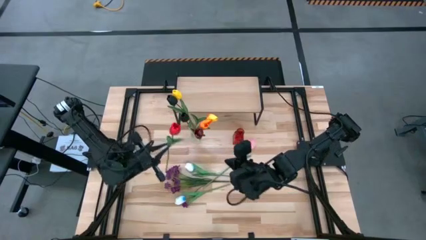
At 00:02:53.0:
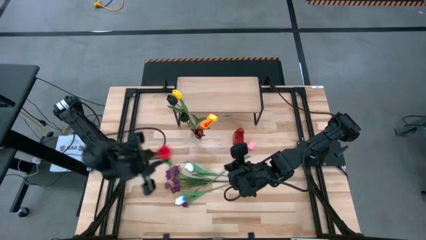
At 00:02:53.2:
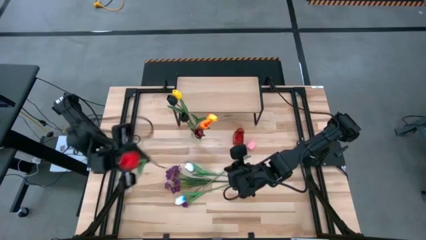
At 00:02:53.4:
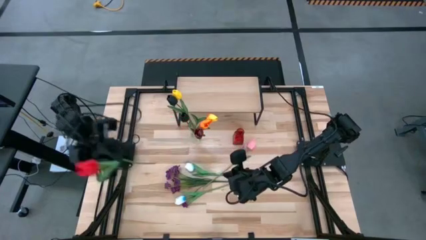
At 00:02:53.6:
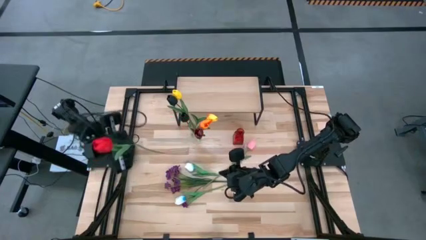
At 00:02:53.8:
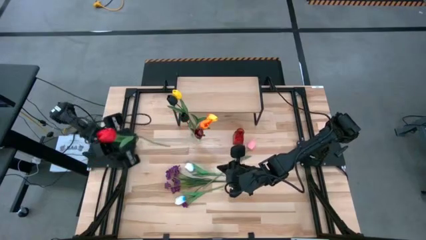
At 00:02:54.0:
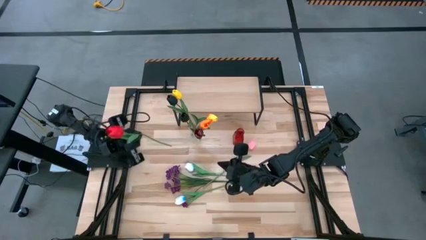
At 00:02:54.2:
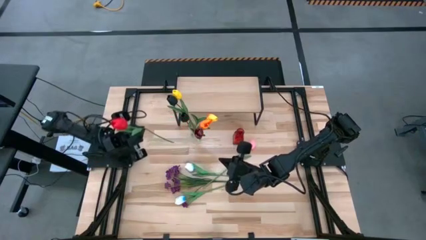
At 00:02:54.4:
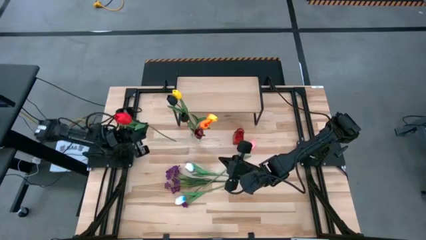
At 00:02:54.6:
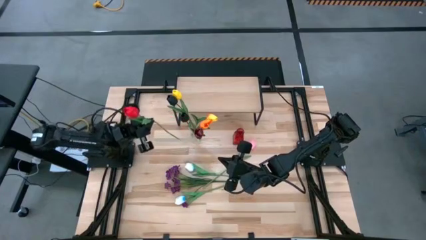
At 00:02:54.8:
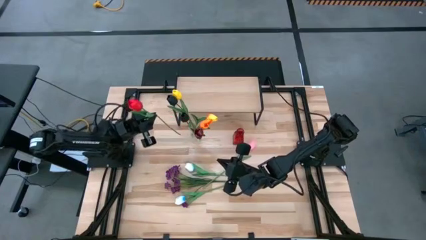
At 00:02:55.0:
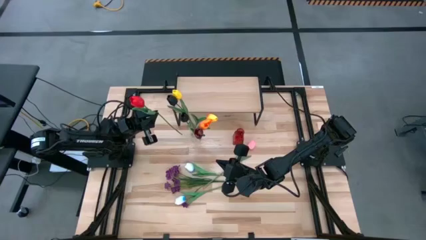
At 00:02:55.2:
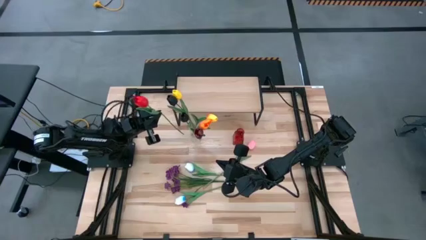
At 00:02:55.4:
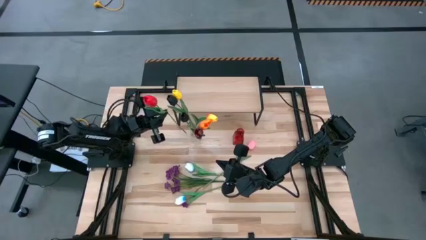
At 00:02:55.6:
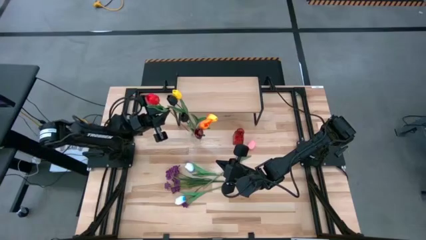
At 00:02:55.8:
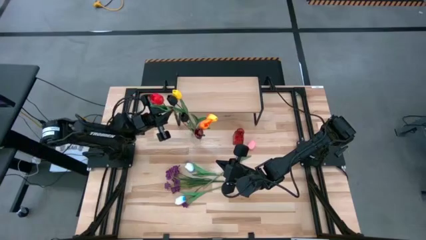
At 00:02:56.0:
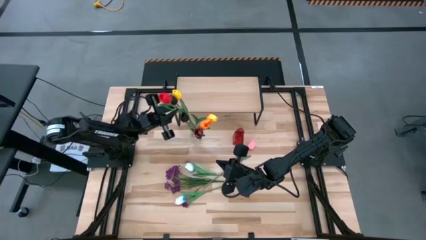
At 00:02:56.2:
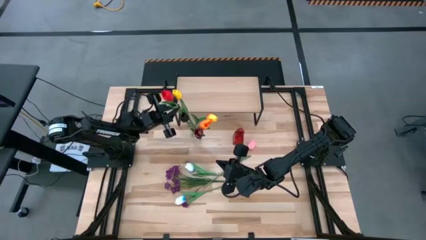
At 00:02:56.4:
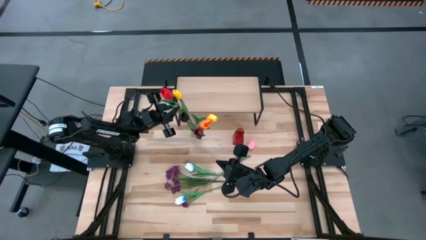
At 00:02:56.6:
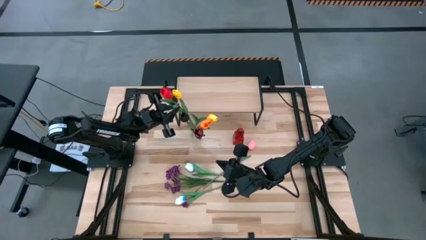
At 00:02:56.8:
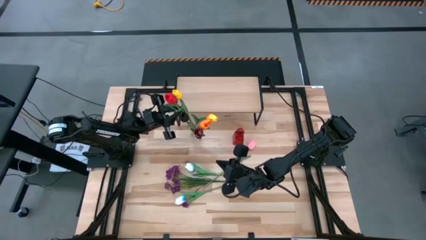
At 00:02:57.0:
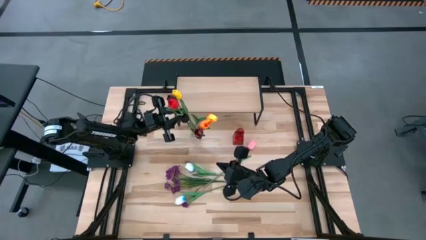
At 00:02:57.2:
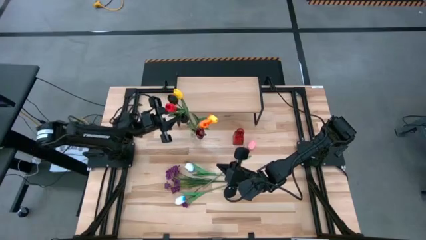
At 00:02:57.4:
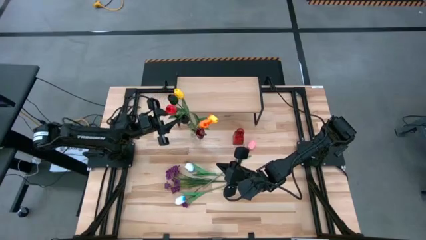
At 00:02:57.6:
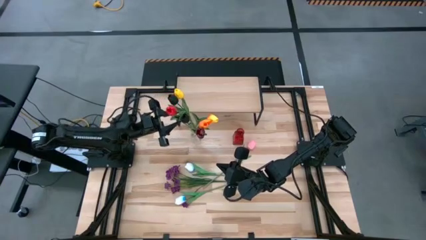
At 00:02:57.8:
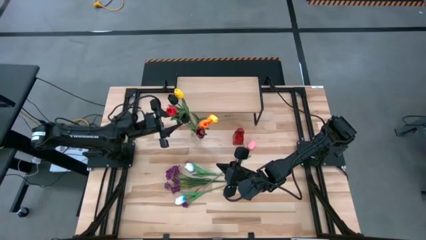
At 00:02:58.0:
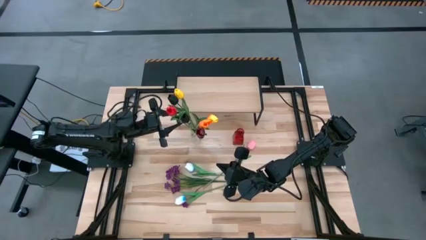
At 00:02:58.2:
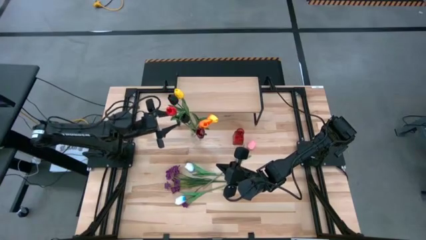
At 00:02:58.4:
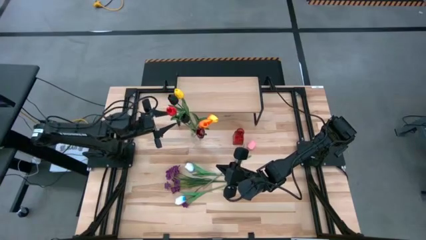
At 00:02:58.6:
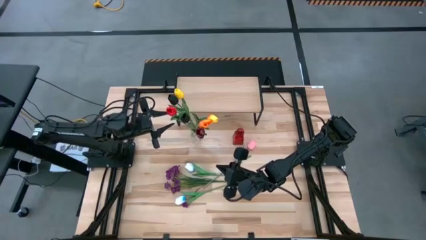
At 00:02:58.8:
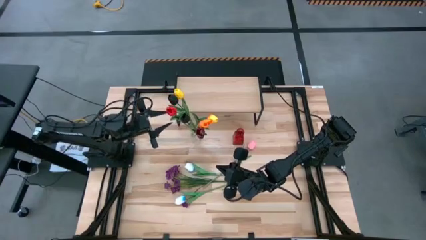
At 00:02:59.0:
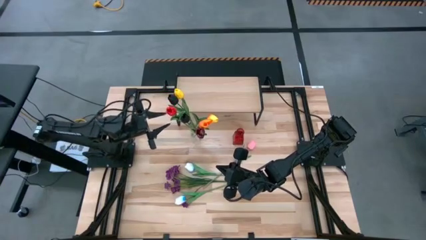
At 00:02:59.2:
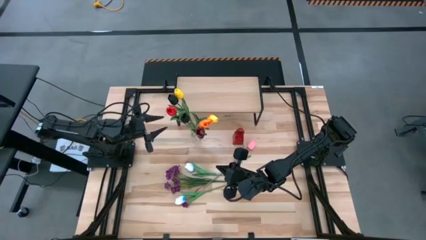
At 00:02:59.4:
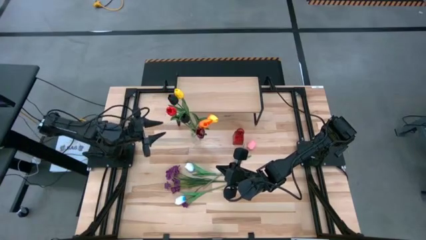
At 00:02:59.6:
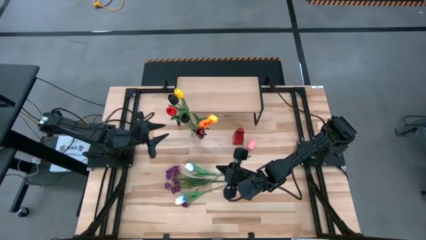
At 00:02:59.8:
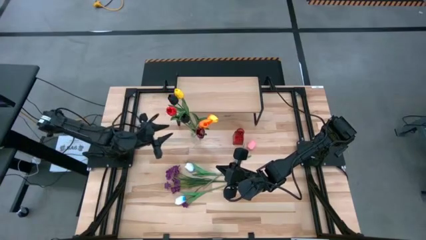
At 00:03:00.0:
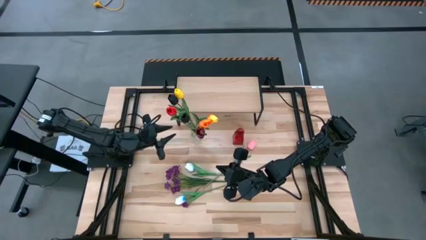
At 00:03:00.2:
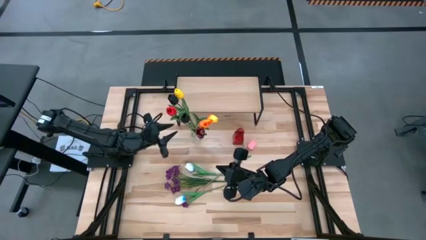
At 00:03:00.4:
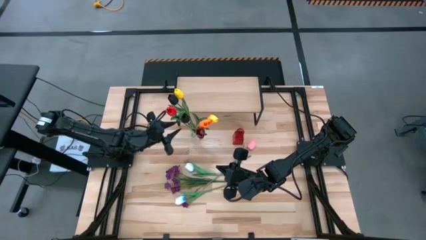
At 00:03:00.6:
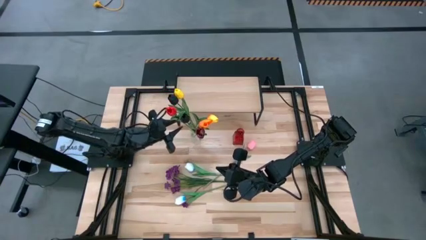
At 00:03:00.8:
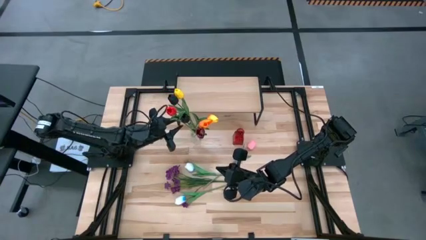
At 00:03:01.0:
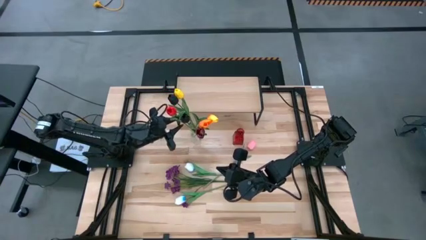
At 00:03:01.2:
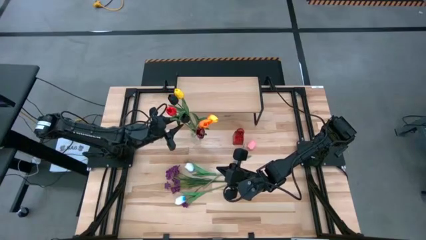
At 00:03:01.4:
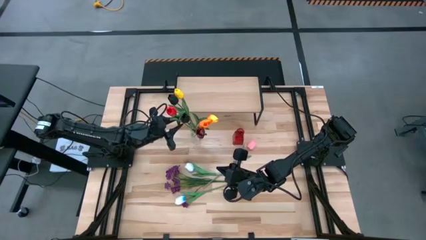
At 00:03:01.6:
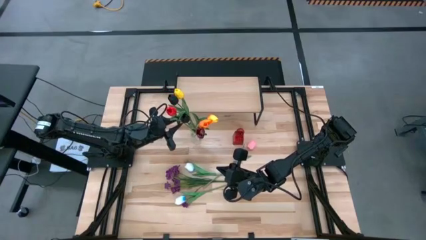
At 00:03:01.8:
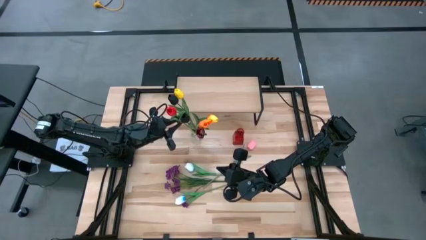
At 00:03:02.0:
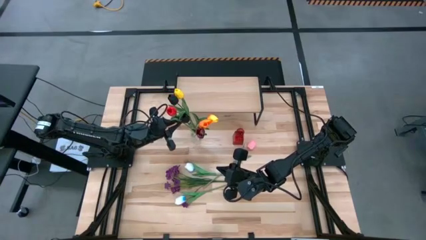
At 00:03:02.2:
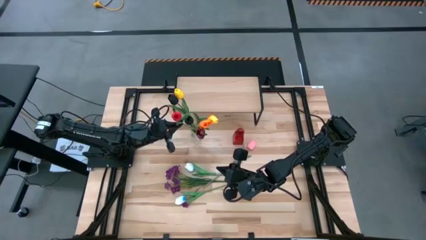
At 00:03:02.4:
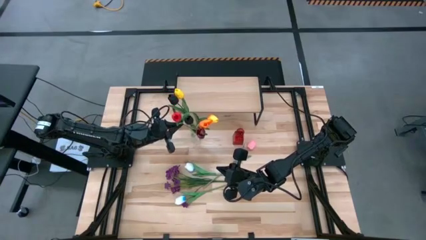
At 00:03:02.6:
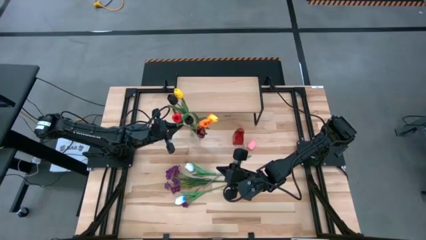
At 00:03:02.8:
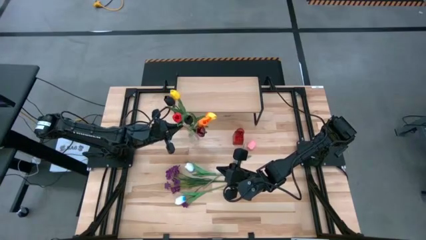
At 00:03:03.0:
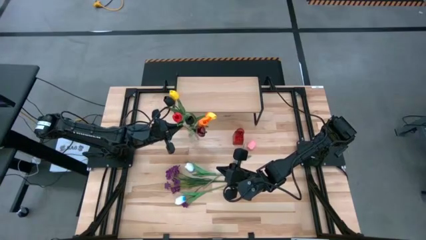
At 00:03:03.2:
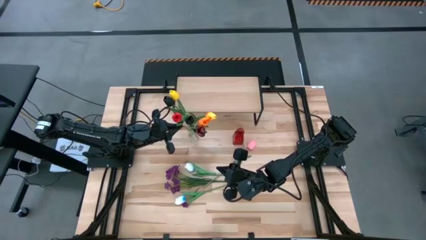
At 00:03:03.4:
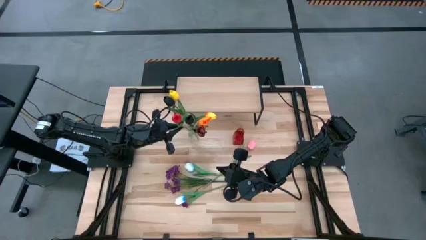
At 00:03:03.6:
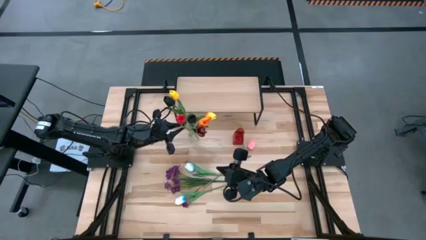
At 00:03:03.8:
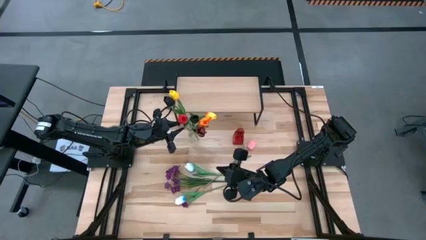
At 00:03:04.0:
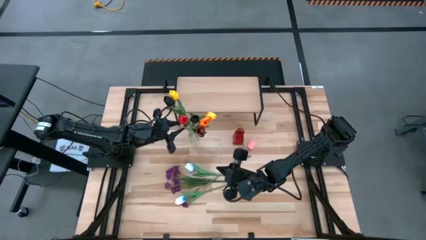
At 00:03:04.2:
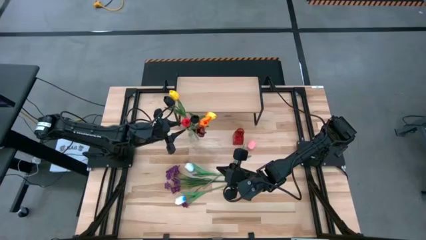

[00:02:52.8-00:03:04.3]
Task: Pick and place flowers into a vace then onto a shelf
Put the red tulip into the transparent vase

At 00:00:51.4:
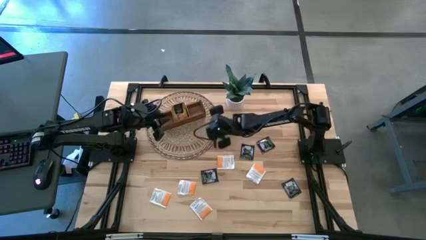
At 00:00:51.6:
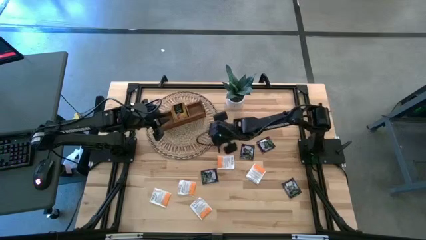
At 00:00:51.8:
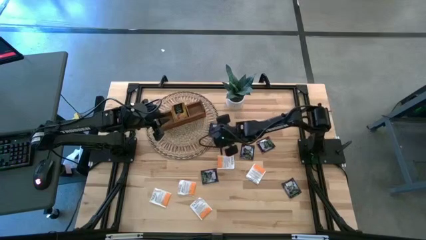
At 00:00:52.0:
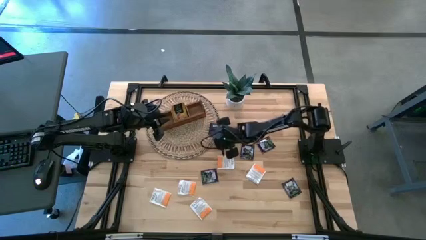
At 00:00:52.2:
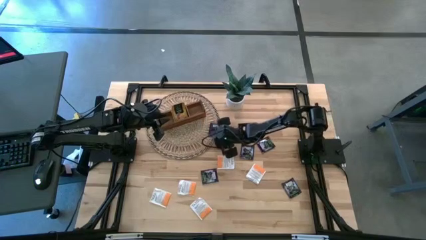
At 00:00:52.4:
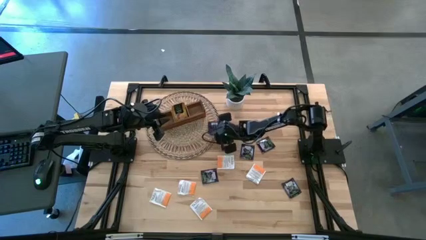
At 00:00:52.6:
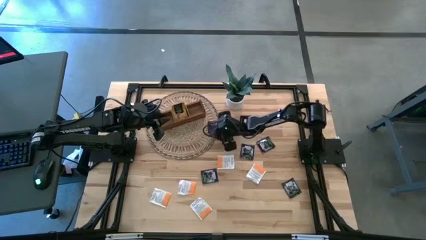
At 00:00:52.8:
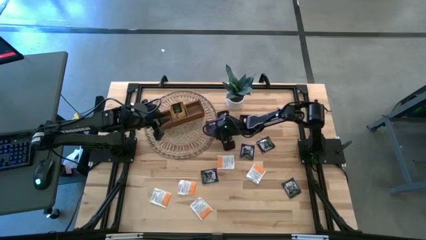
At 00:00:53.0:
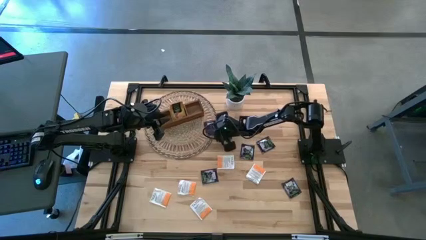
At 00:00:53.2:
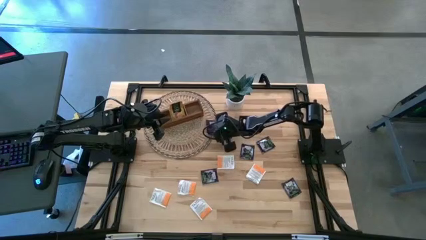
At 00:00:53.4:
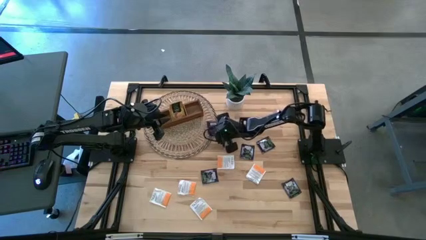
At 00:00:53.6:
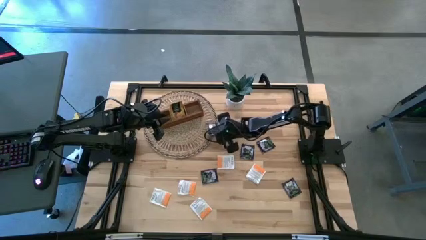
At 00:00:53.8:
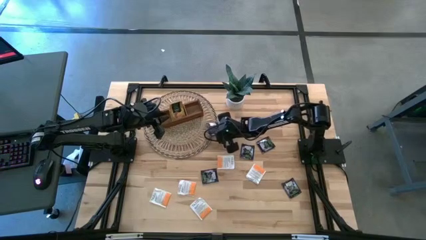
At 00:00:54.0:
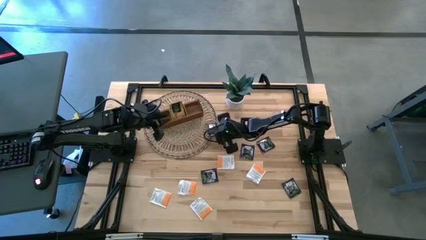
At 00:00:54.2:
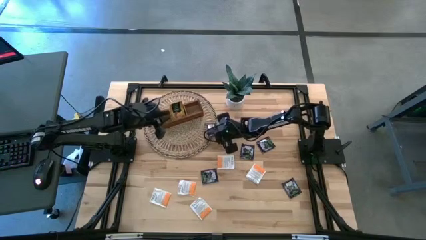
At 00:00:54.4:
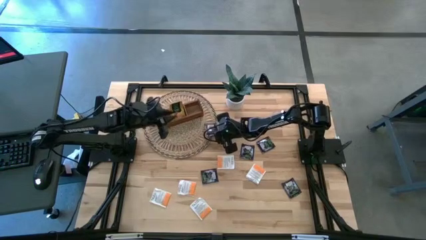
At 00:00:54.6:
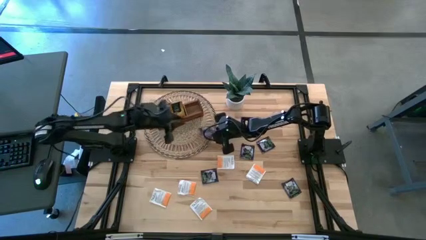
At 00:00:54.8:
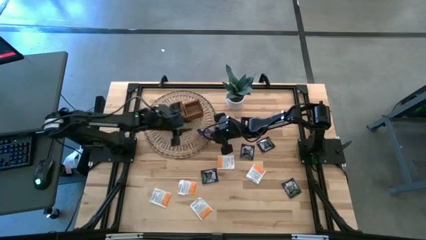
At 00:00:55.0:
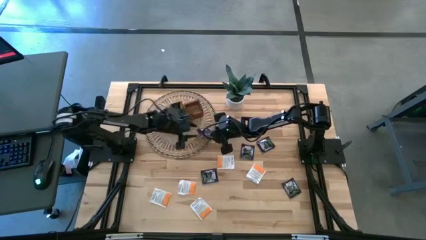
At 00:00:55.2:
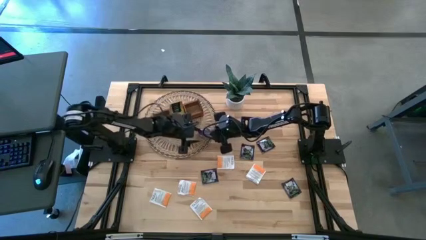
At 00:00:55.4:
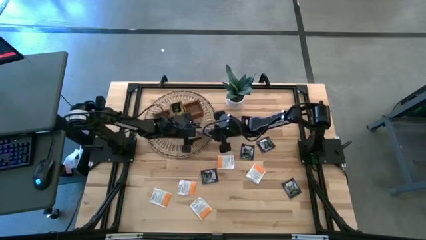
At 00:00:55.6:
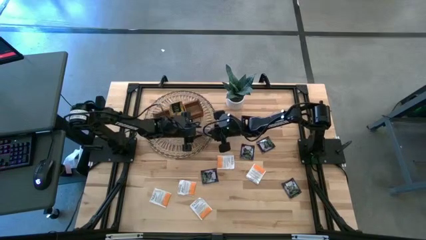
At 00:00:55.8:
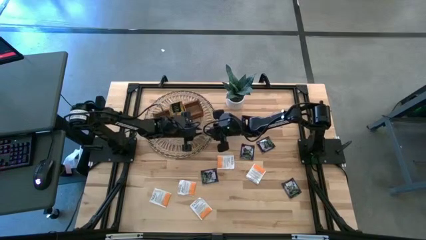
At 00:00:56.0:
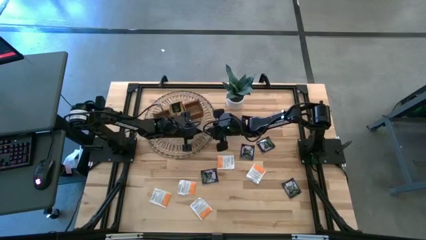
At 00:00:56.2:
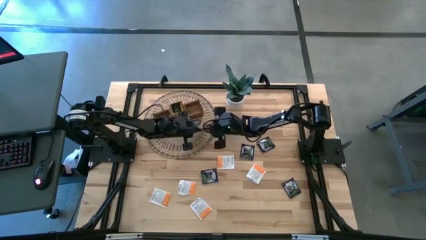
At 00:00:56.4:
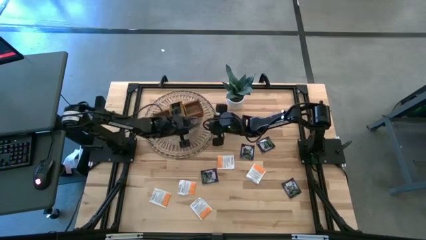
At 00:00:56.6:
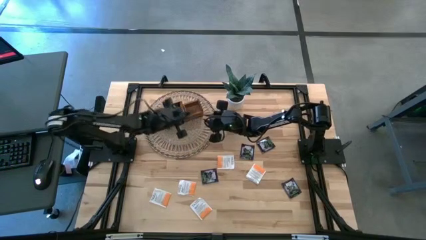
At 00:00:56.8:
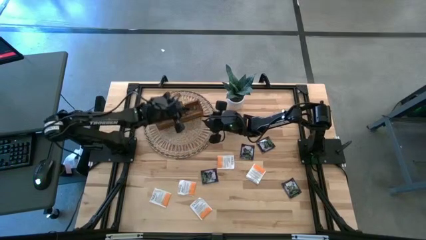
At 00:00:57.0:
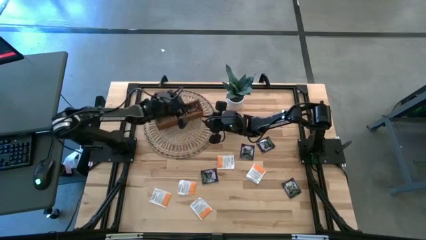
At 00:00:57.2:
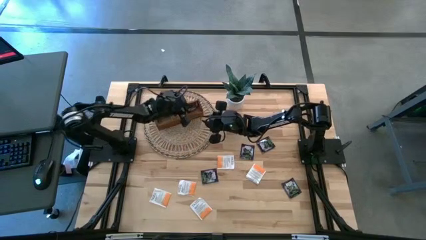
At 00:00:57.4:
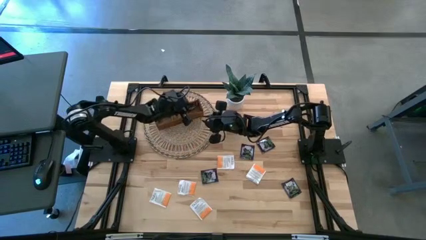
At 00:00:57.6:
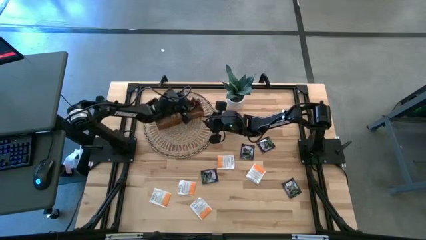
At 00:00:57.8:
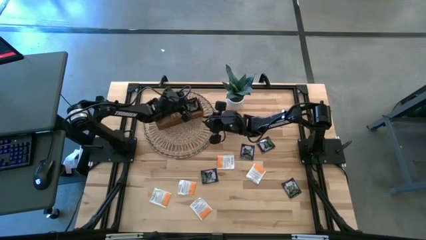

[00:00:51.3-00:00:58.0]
Task: Pick & Place Tea
Put the black tea bag into the right section of the wooden organizer
